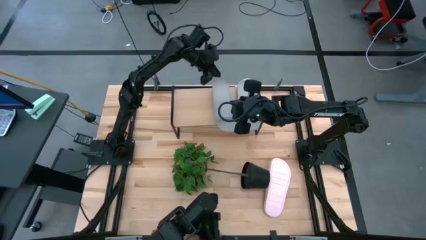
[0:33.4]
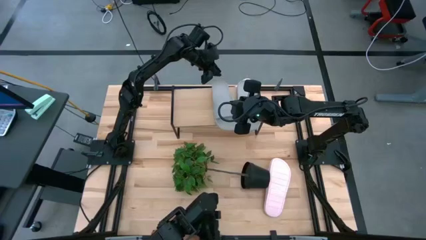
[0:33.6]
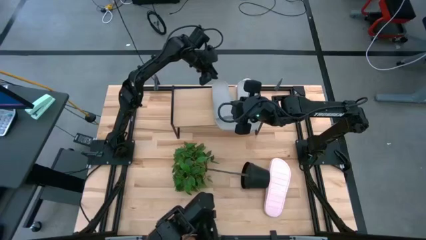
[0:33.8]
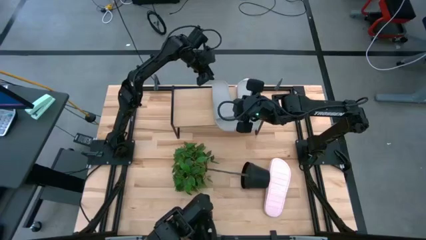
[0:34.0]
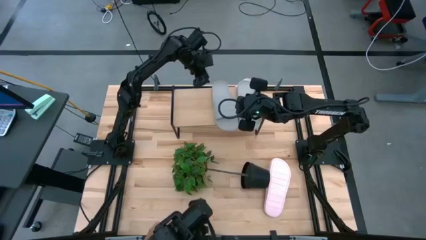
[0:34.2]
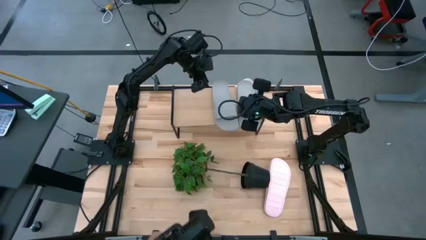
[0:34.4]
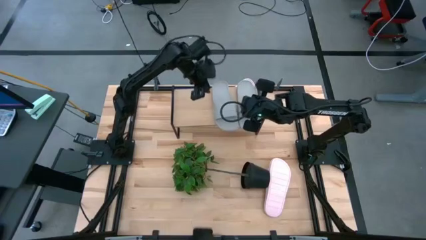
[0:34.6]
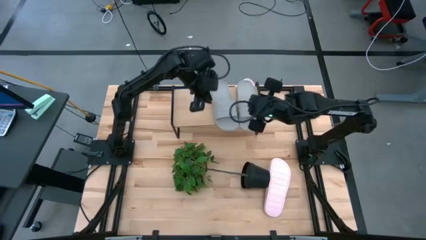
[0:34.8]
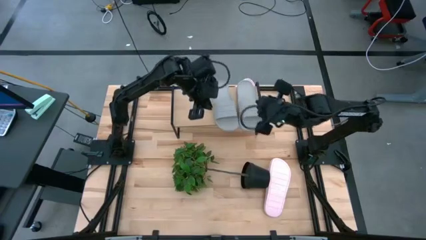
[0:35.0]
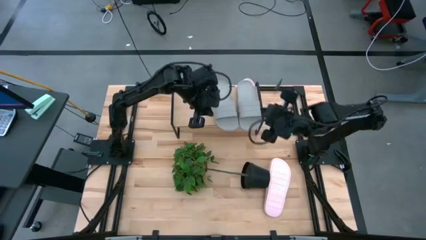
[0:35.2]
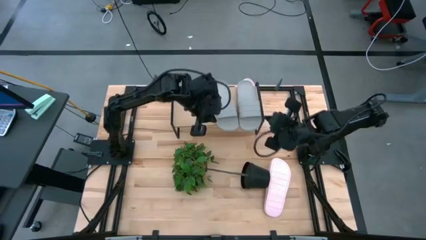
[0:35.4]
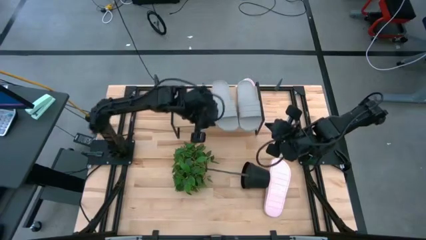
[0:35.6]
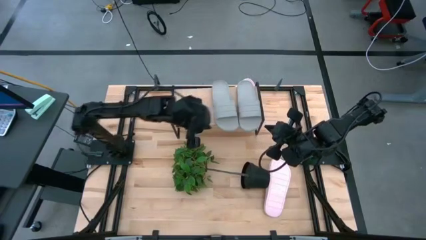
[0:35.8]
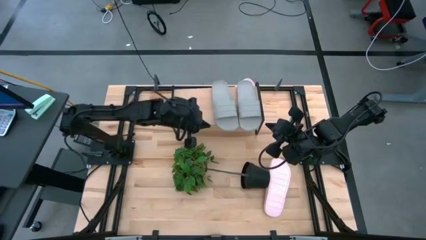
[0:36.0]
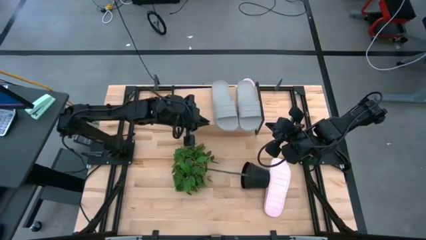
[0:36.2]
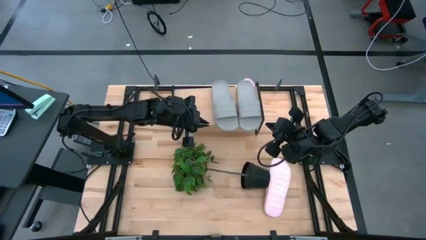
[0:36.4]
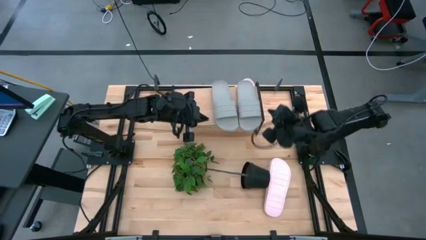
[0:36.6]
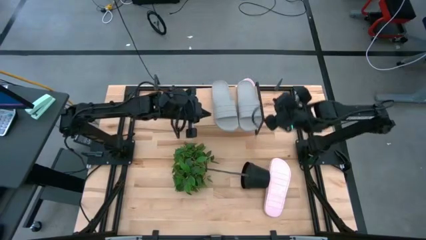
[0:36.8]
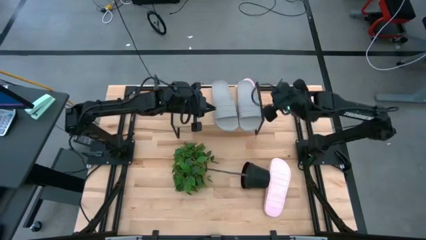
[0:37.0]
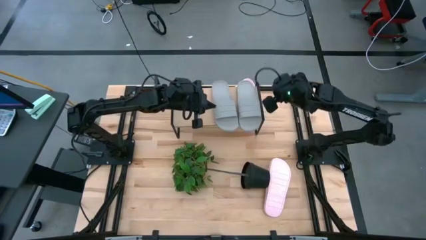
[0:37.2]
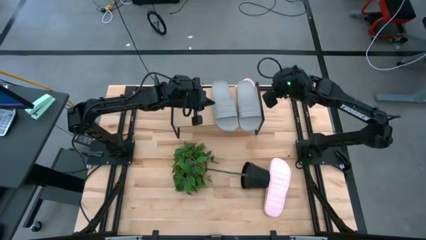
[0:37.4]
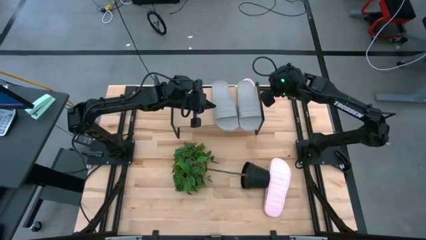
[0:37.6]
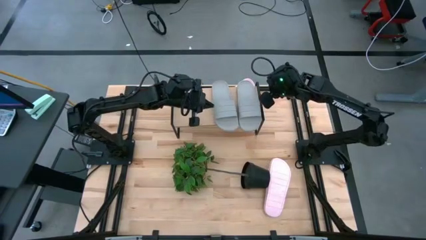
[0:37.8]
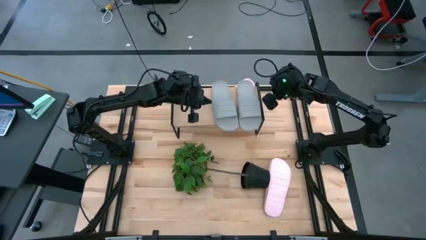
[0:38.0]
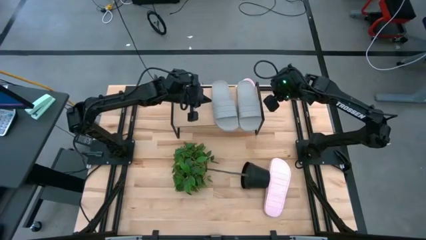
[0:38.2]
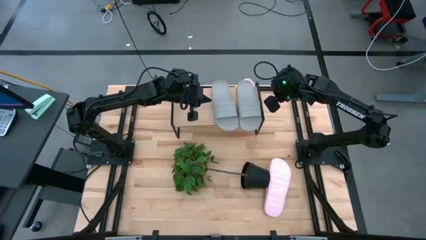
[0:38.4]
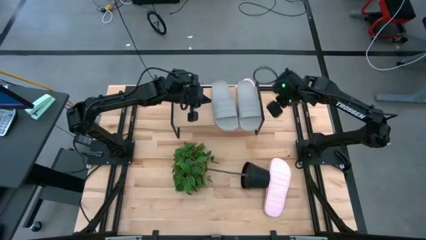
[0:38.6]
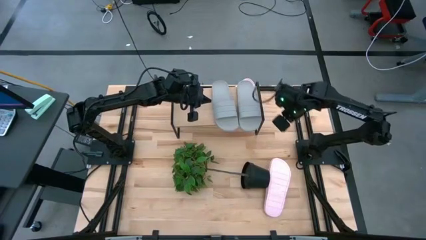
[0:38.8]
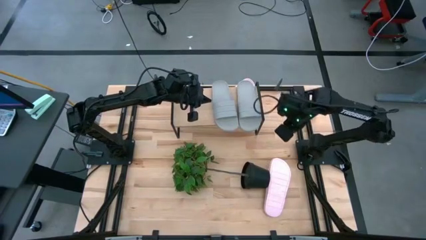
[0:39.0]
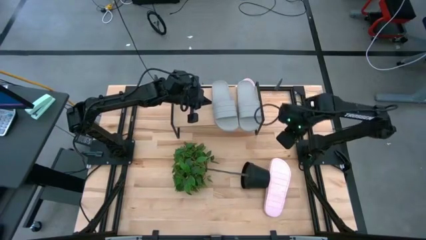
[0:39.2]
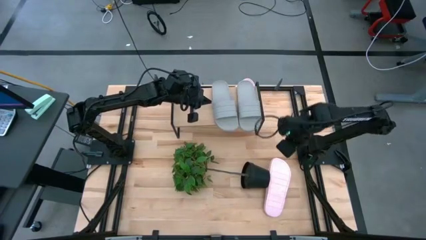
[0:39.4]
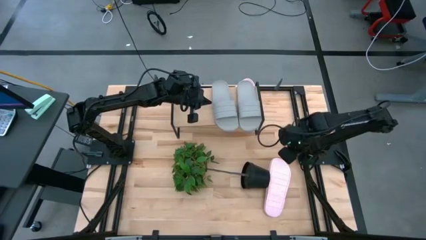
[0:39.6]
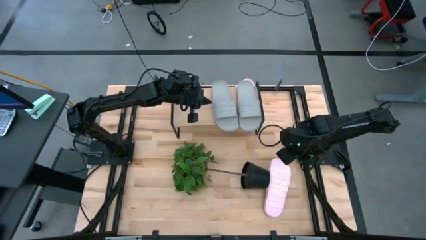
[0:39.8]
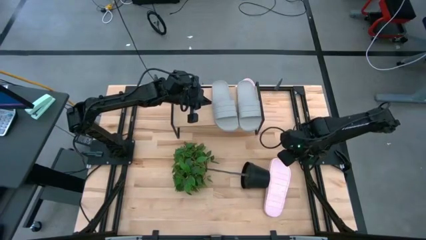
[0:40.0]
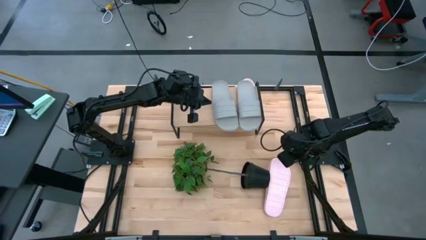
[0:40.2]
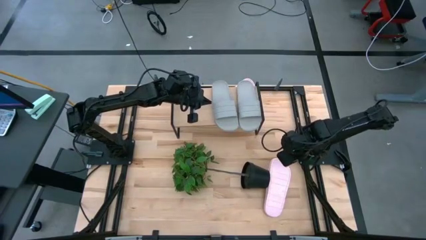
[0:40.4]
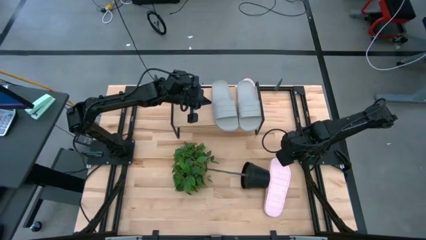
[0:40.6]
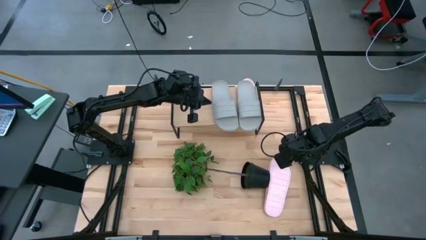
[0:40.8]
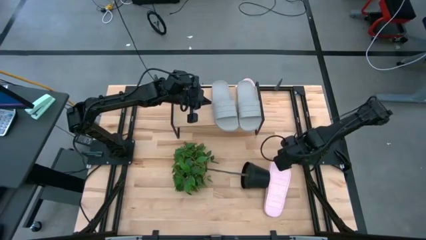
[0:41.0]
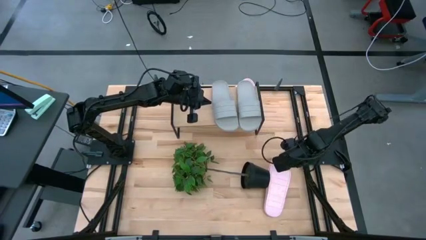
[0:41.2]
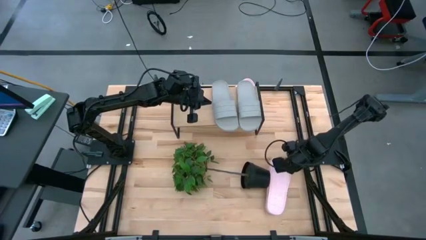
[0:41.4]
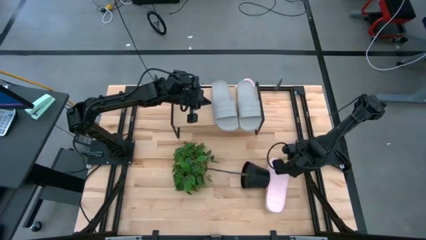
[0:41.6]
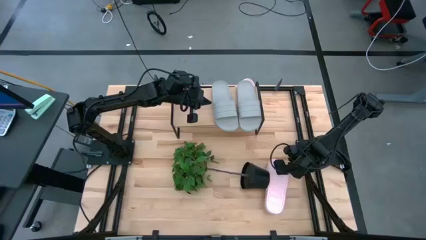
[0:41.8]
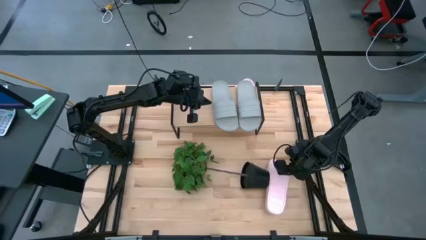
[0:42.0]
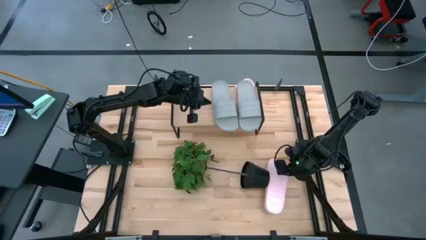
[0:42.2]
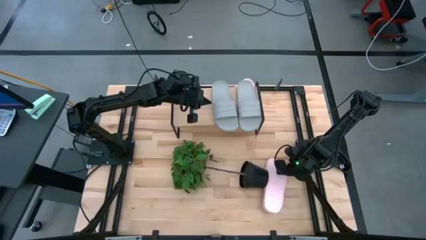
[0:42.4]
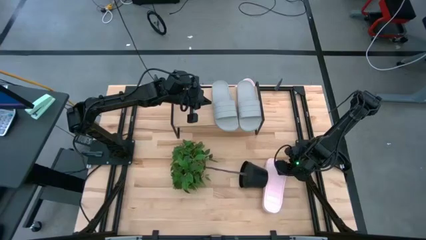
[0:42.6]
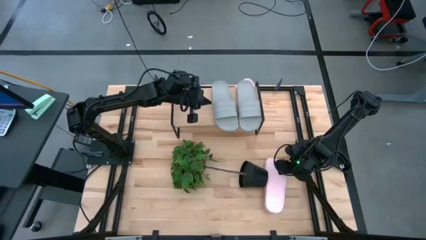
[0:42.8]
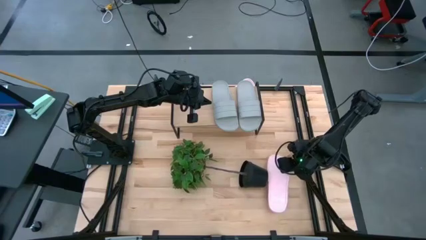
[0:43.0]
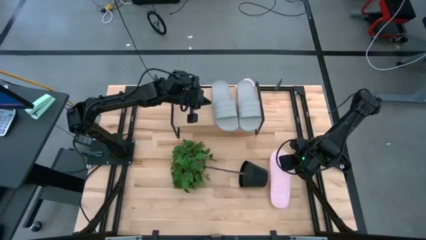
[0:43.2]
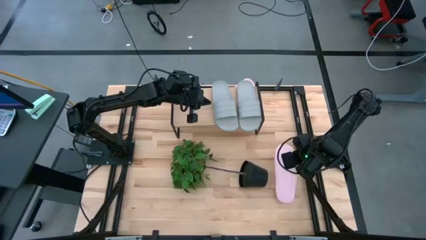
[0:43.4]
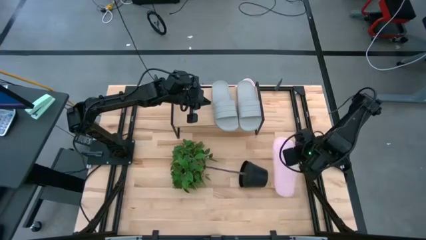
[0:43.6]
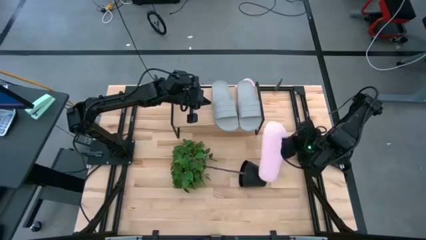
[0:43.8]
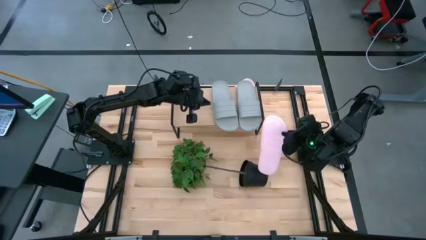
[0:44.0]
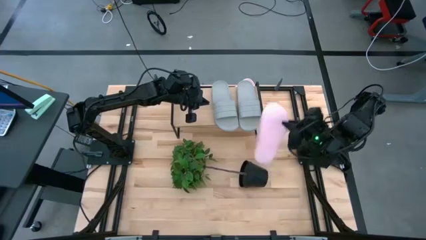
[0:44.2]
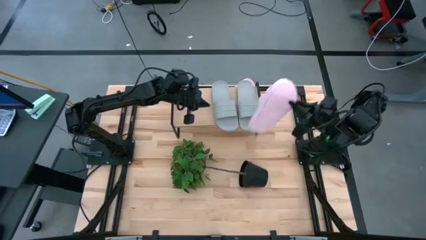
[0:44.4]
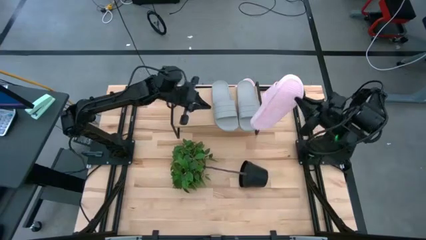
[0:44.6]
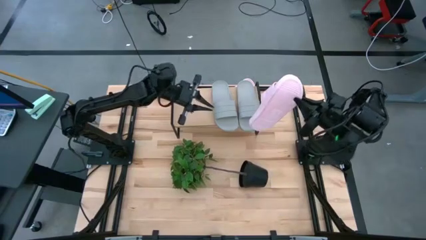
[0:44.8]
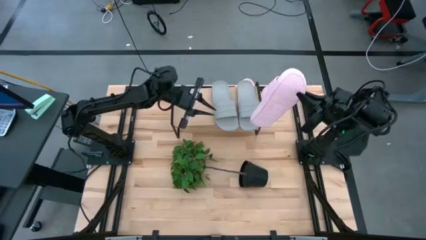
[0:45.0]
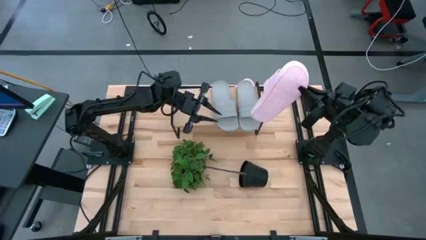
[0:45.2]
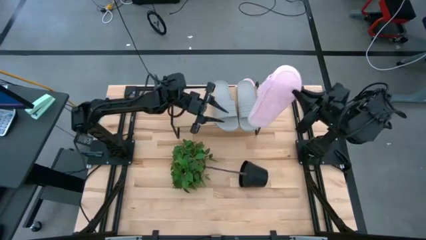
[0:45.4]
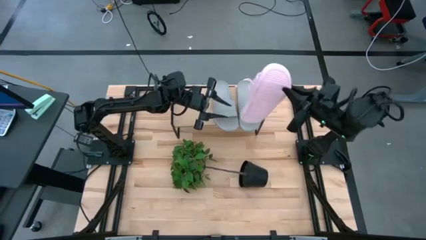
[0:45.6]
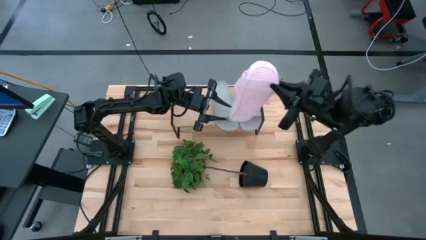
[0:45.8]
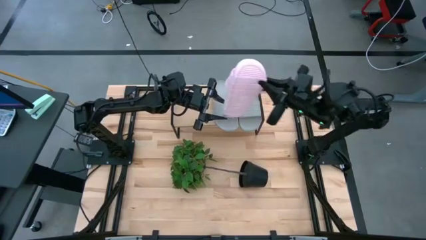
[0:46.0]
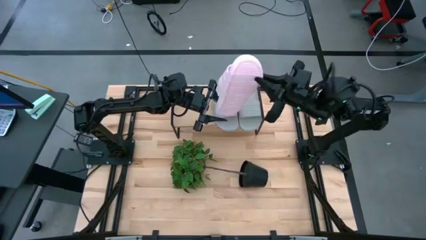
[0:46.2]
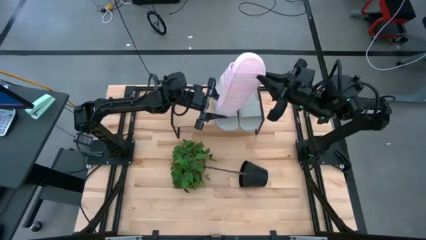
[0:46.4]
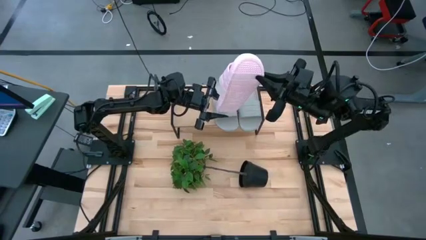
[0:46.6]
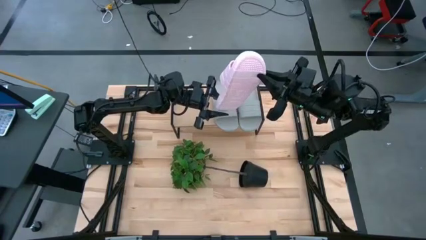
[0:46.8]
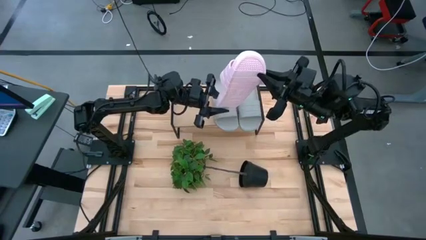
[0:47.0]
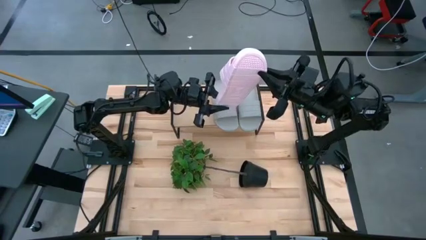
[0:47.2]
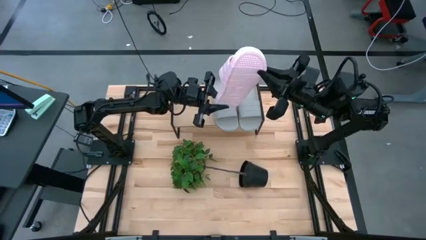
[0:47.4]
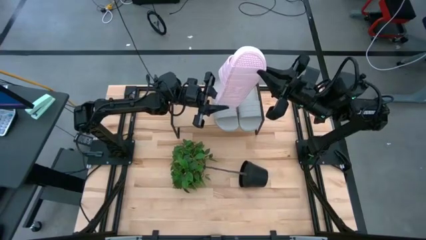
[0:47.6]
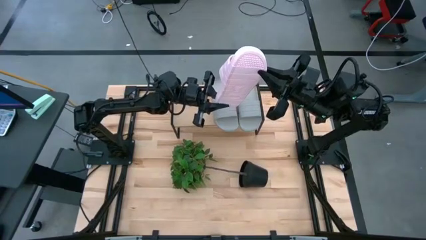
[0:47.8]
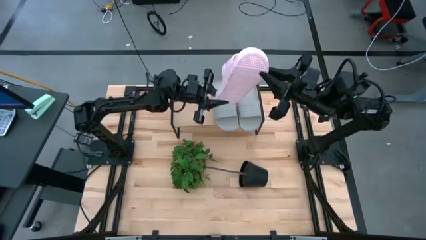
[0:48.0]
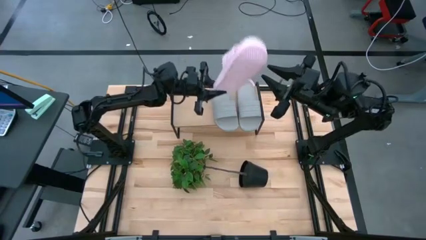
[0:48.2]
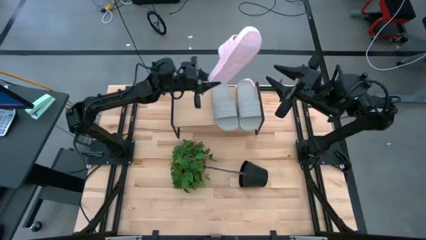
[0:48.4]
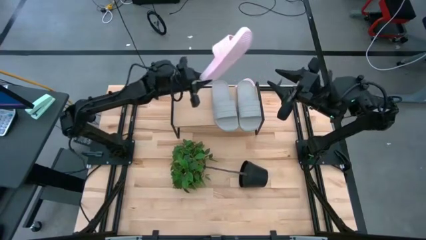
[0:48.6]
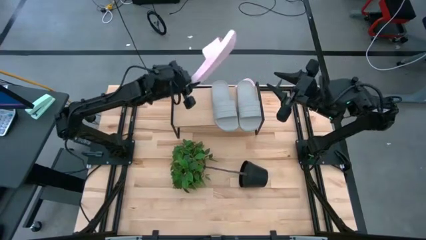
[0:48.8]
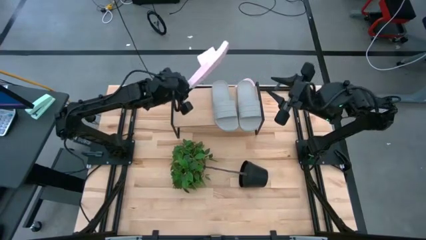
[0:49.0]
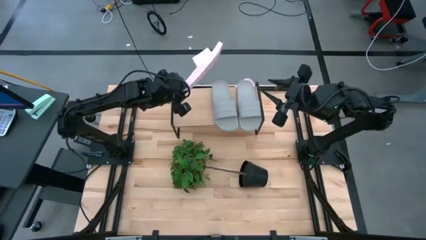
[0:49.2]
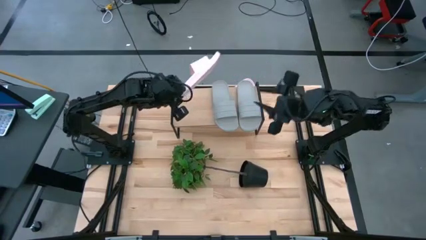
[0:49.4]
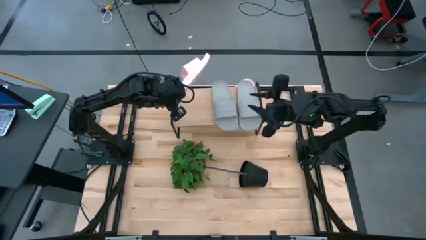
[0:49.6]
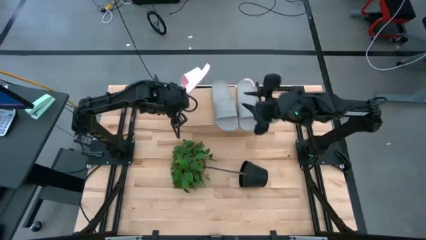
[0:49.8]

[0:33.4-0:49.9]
Task: Pick and place slides into the shelf
Put the bottom pink slide on the shelf
